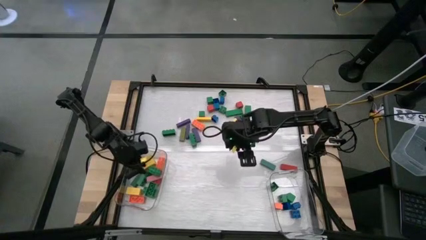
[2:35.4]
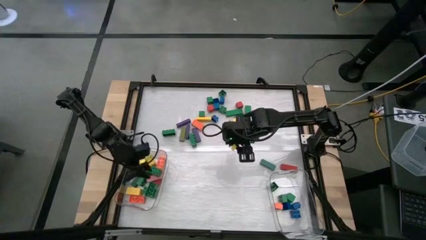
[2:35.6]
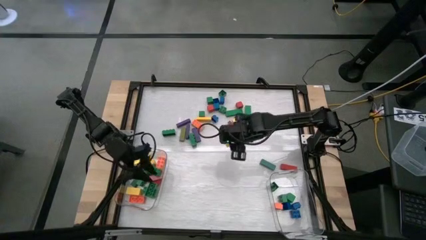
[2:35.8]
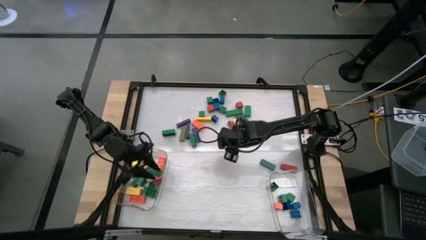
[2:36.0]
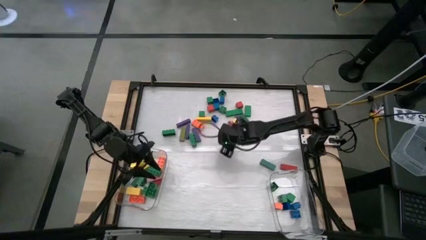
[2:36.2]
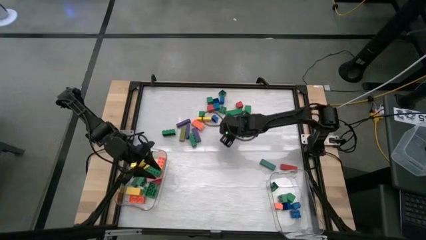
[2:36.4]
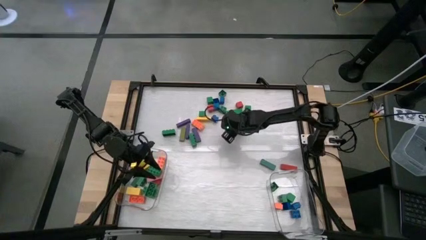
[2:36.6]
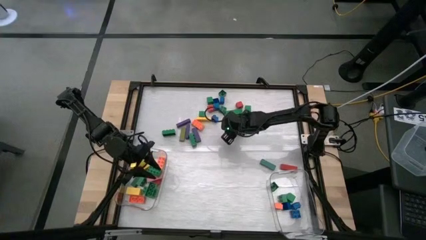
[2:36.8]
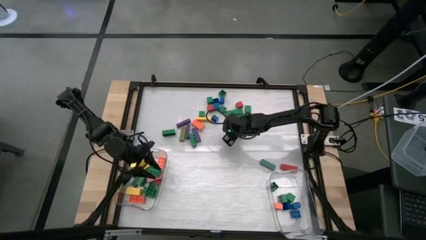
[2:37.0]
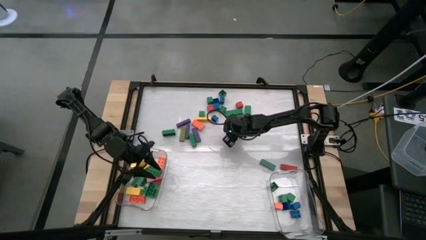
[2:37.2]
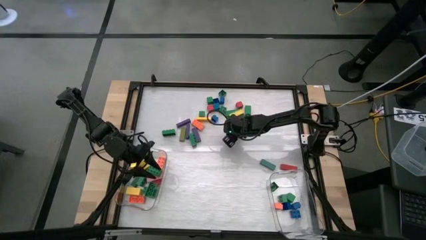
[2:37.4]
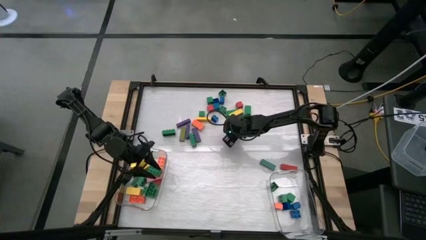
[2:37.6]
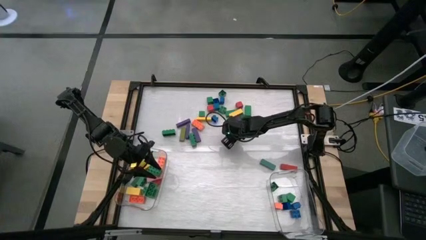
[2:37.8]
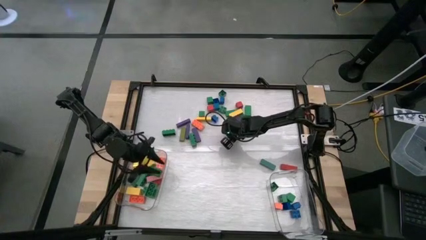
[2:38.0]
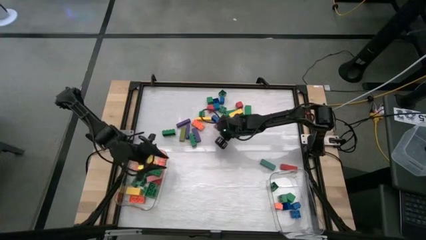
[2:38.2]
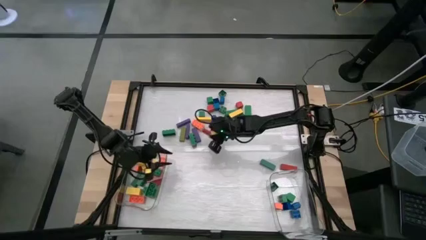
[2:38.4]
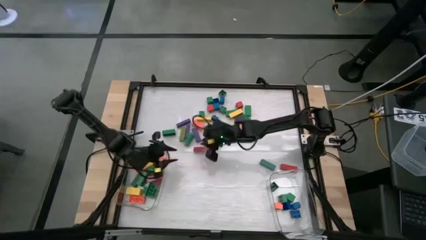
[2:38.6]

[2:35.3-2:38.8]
Task: Sort blocks by size
Put the red wooden block into the left transparent bin

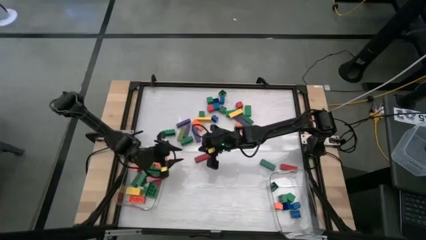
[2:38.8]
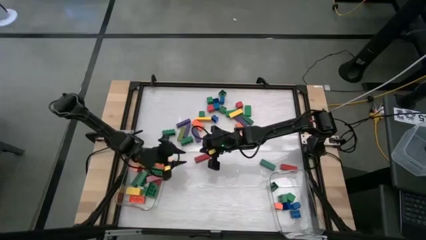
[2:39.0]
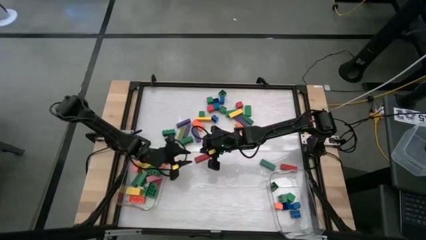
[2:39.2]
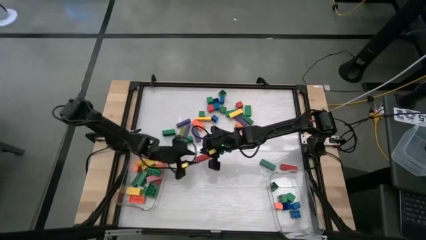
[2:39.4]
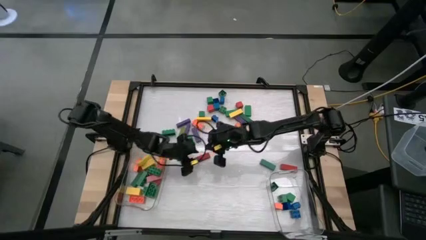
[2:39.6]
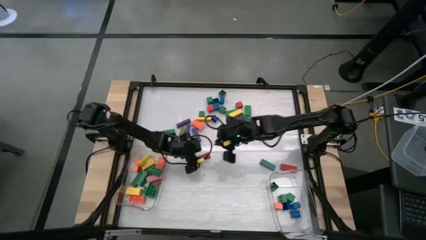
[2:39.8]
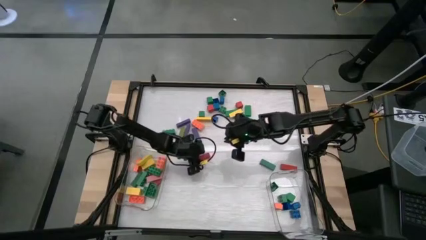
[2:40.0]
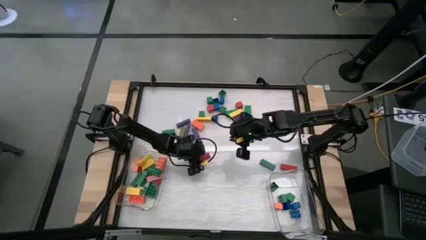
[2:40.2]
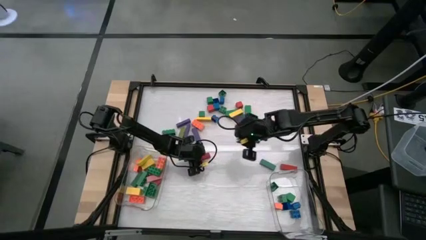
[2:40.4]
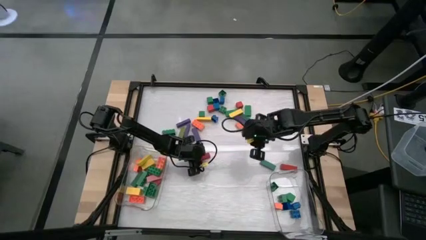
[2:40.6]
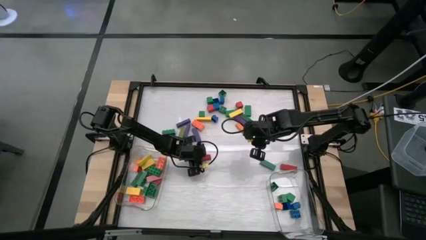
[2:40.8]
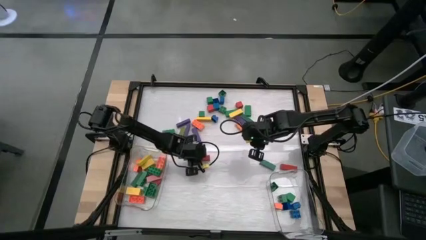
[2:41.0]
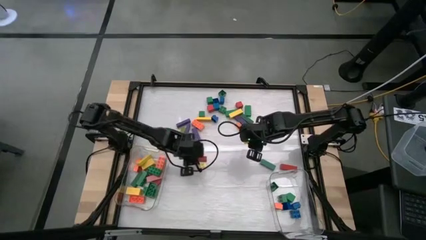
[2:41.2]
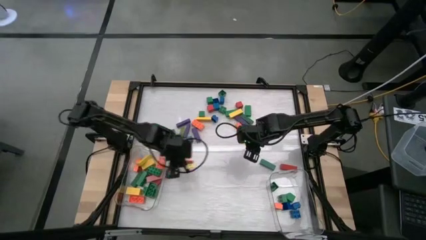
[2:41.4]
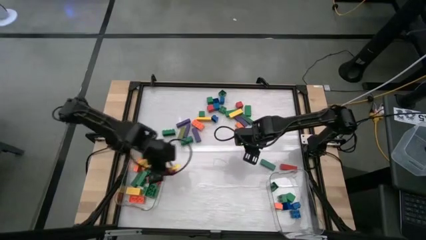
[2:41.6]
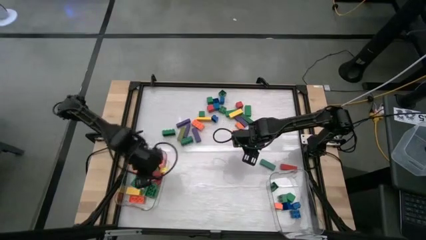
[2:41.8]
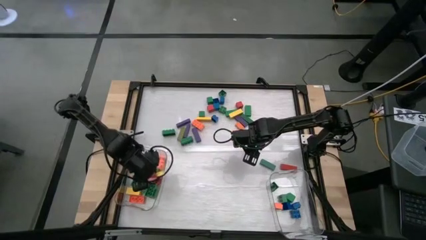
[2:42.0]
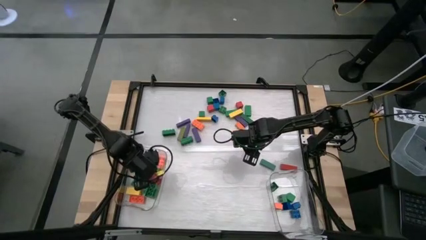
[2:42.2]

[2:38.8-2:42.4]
Put the red wooden block into the left transparent bin

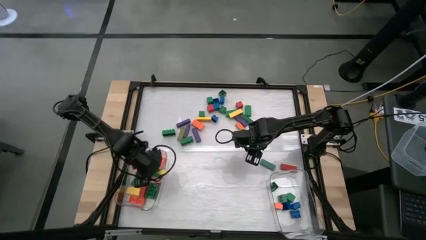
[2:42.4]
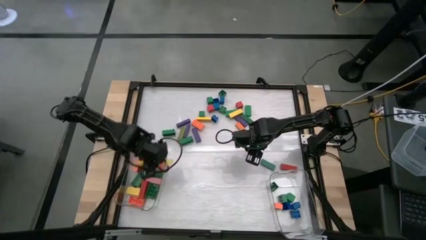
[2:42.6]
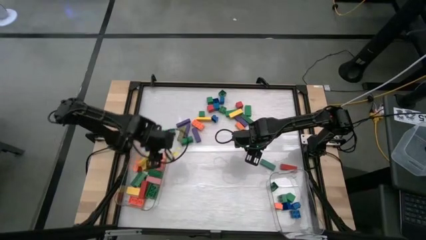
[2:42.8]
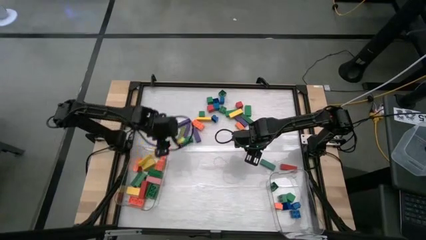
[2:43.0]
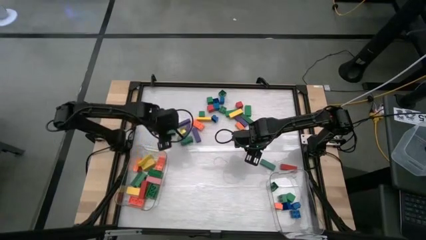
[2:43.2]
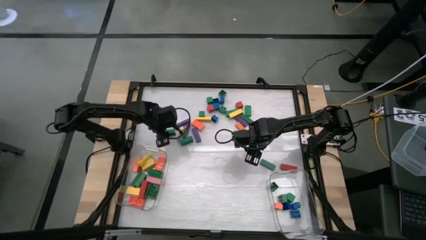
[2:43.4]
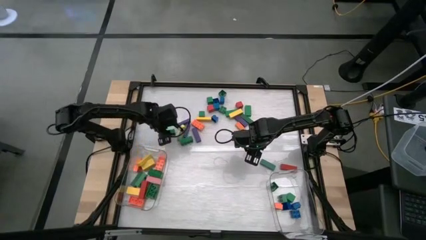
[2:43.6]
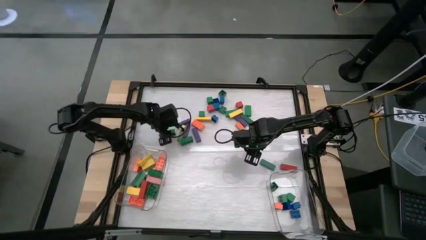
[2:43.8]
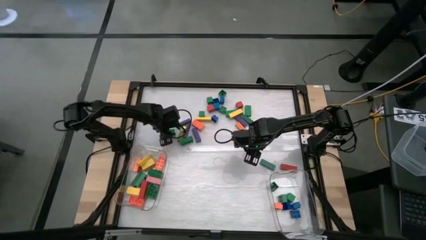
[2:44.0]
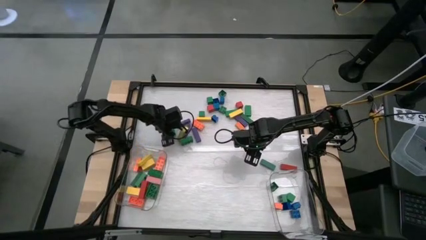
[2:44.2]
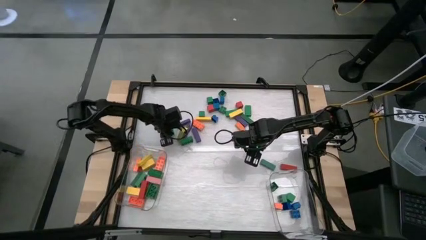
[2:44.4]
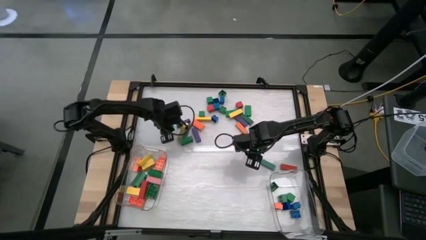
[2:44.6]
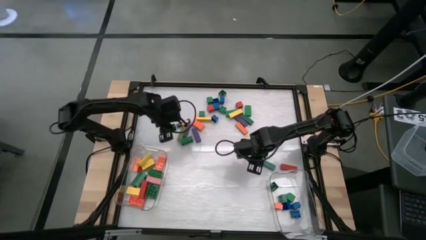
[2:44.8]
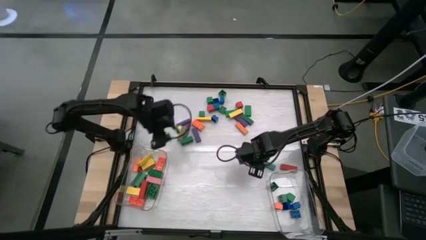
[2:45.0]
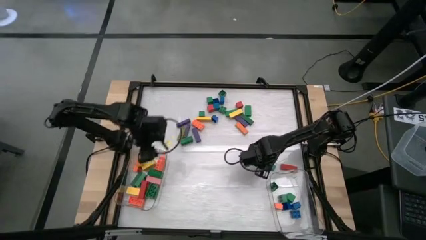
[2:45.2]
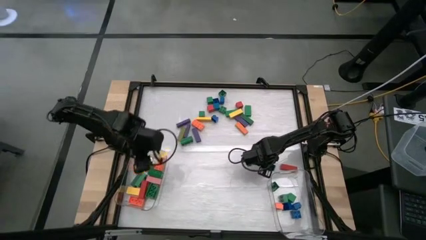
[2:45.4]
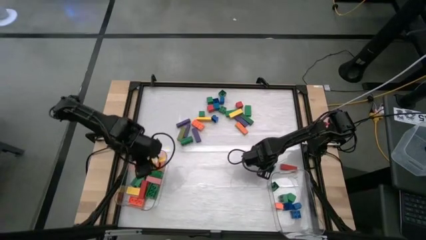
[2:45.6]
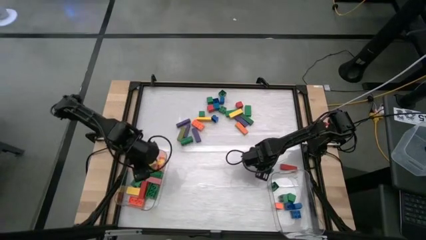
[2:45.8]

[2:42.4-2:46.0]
Put the large green game piece into the left transparent bin

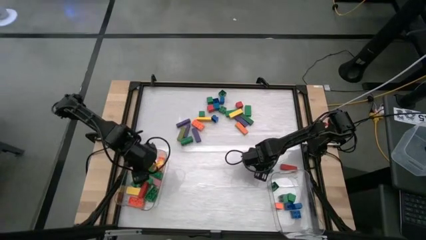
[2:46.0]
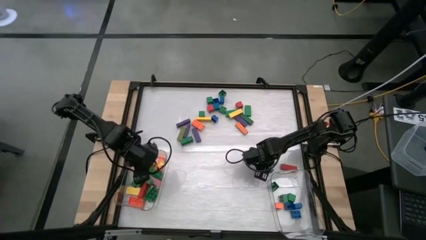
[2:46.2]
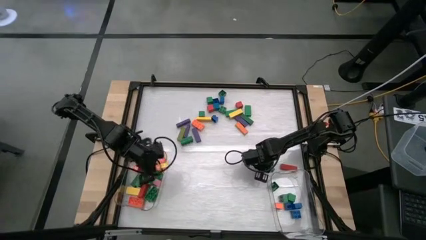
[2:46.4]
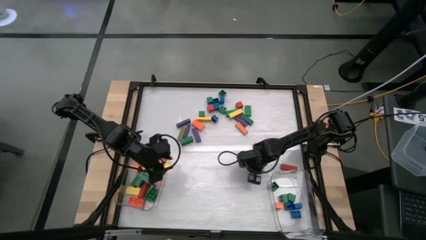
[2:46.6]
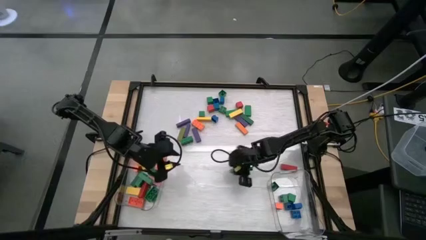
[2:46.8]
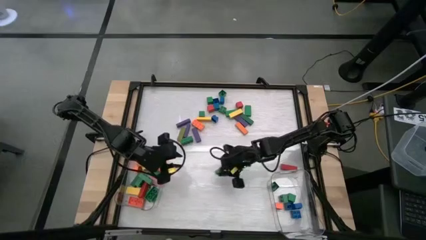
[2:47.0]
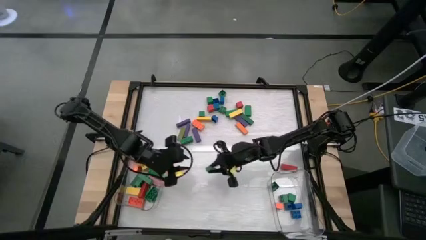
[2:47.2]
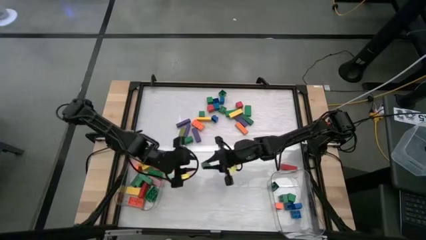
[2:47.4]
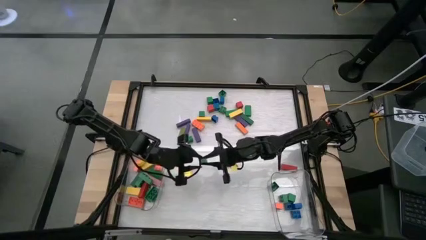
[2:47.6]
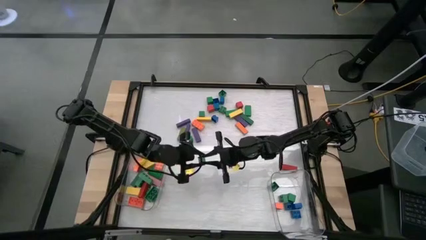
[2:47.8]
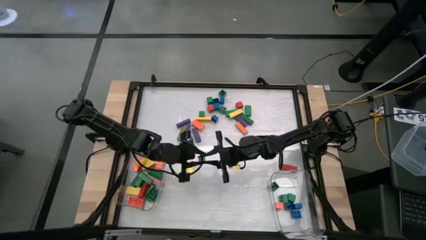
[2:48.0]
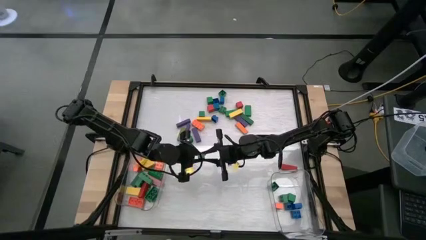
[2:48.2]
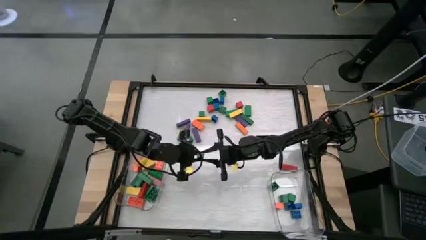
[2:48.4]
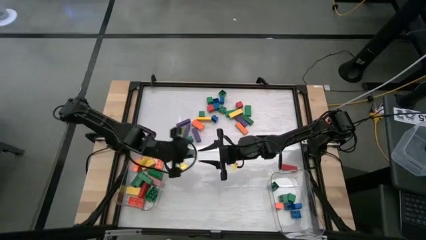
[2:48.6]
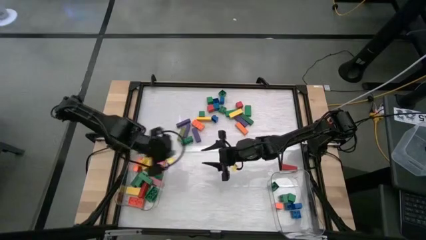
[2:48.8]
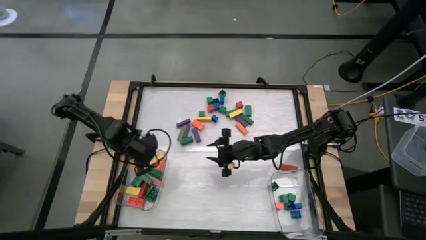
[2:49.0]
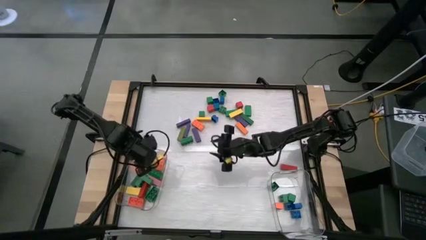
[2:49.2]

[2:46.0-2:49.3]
Put the large green wooden block into the left transparent bin

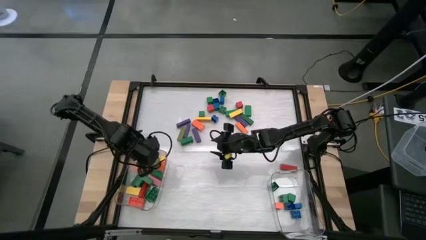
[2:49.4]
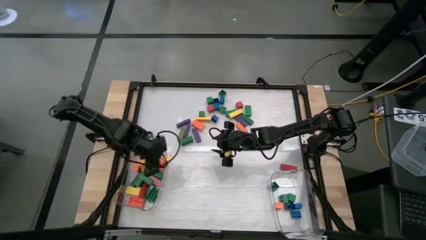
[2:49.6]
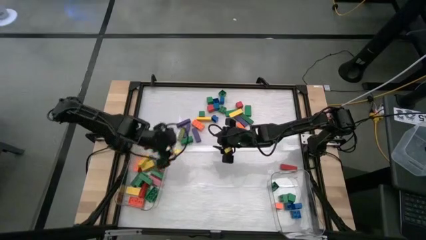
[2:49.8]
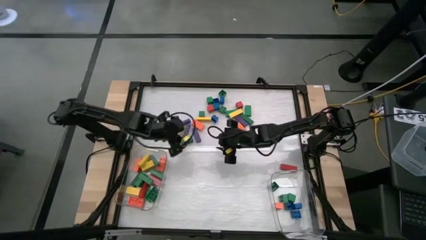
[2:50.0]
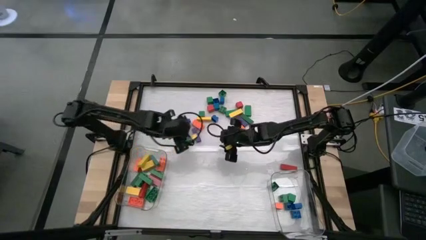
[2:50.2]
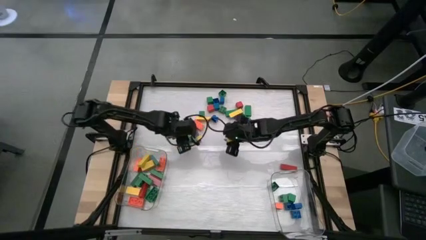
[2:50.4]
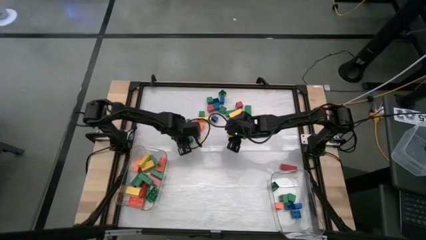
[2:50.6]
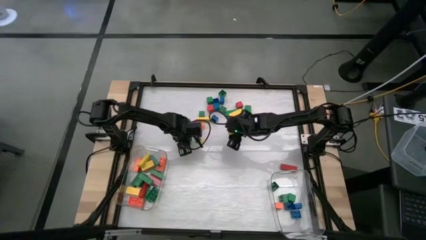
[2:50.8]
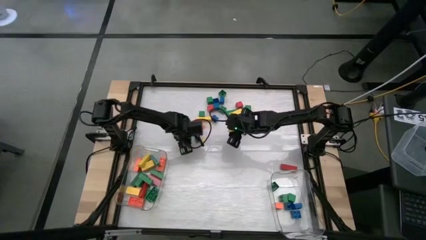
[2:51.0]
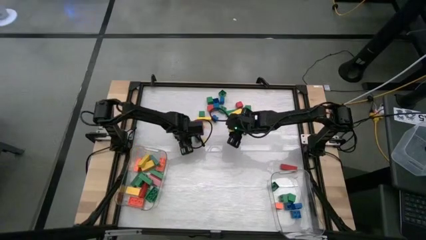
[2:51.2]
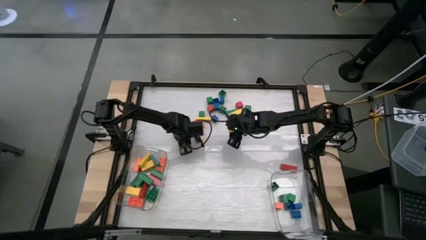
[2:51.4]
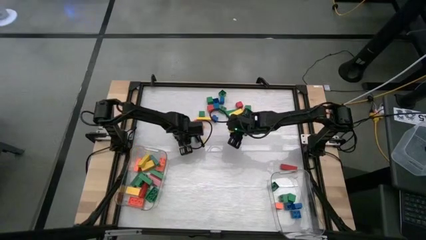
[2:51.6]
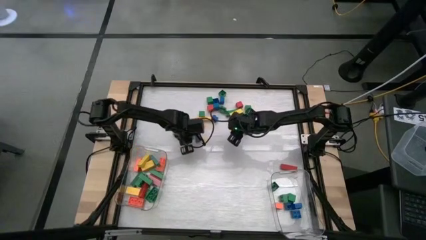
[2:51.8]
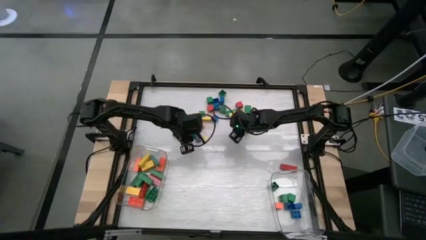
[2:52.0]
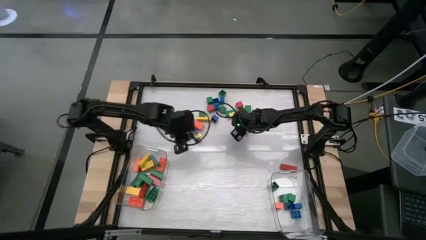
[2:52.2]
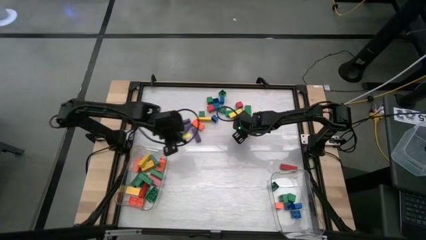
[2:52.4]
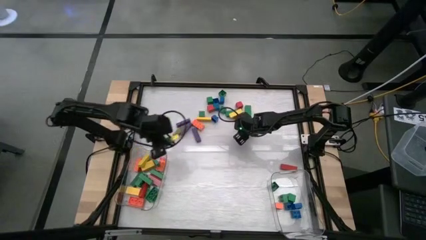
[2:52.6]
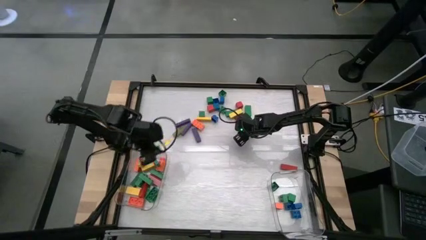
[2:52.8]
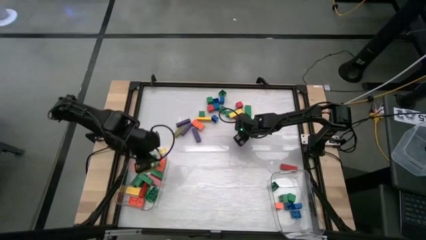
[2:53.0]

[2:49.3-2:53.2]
Put the large green game piece into the left transparent bin
